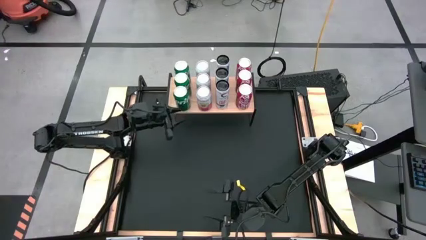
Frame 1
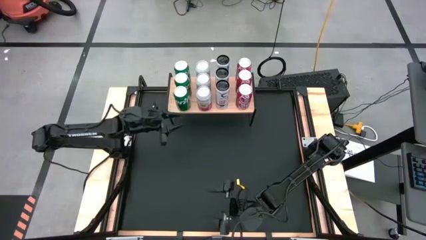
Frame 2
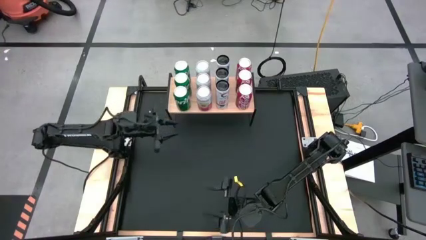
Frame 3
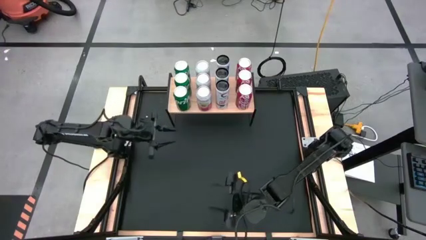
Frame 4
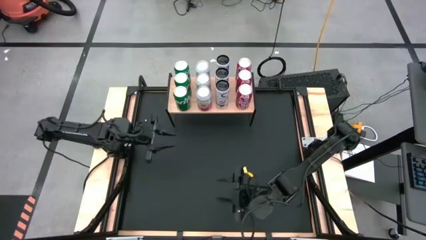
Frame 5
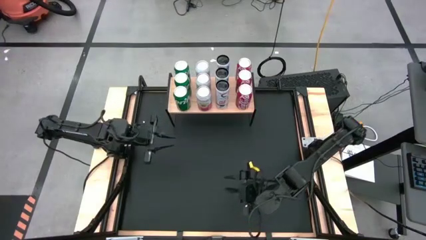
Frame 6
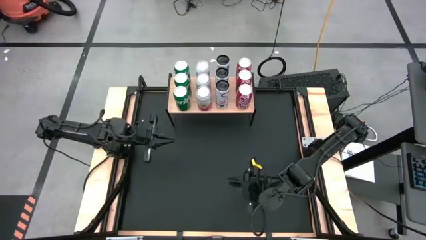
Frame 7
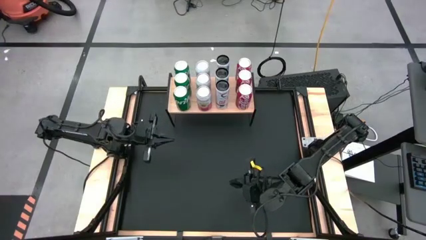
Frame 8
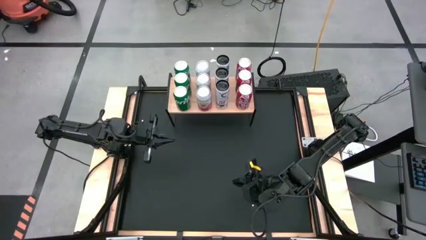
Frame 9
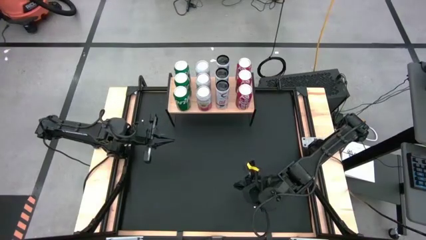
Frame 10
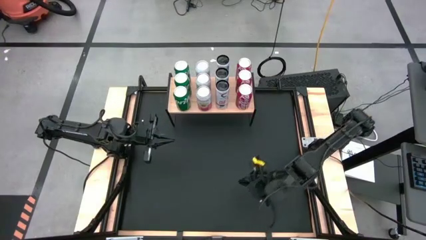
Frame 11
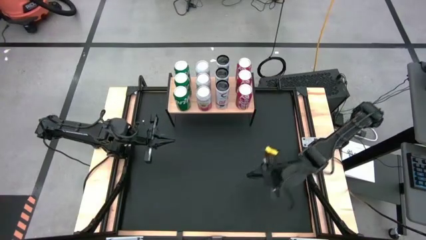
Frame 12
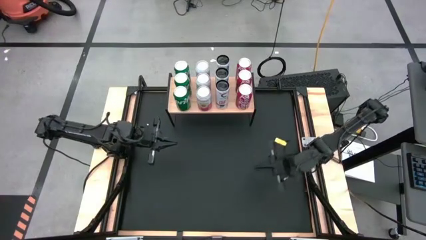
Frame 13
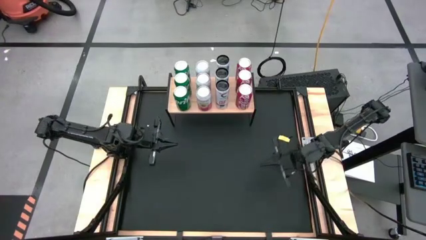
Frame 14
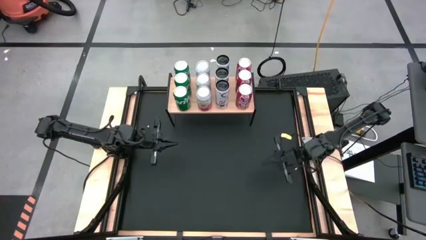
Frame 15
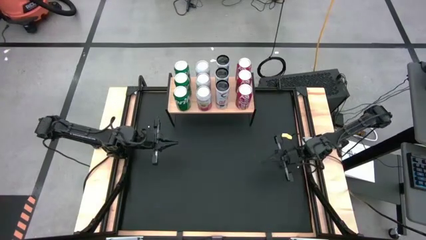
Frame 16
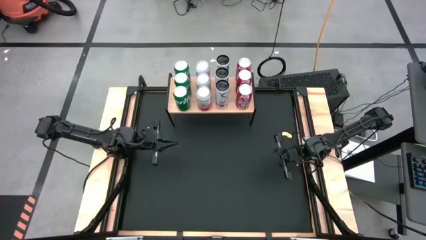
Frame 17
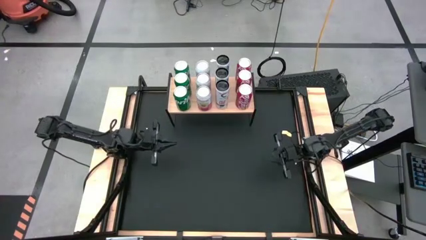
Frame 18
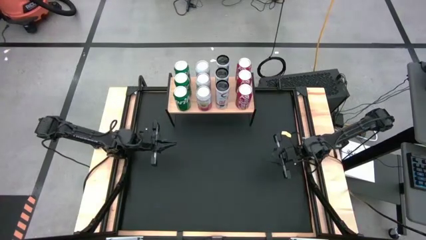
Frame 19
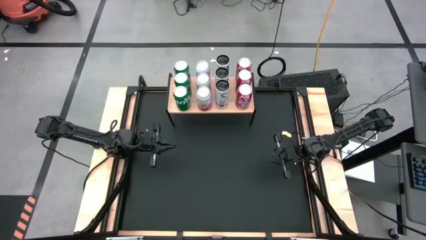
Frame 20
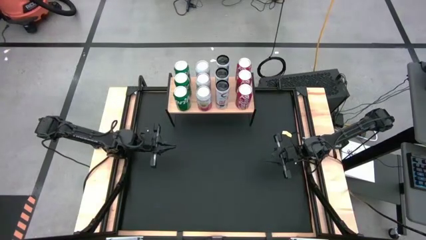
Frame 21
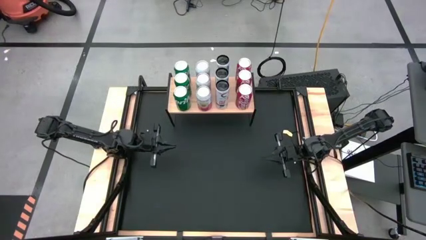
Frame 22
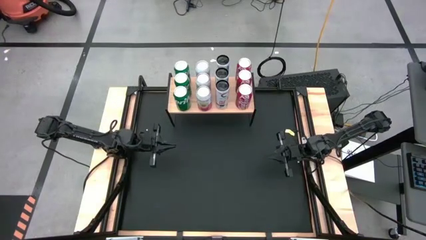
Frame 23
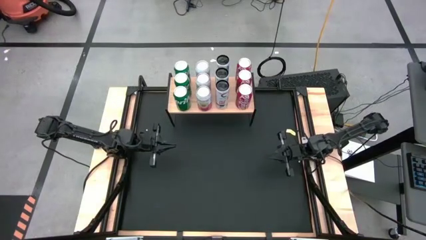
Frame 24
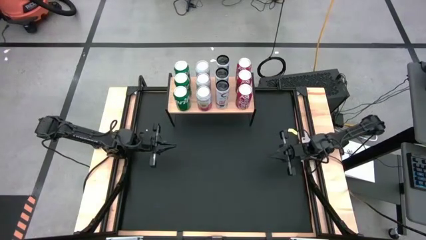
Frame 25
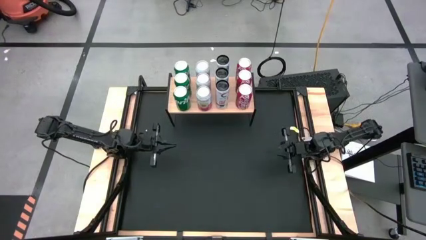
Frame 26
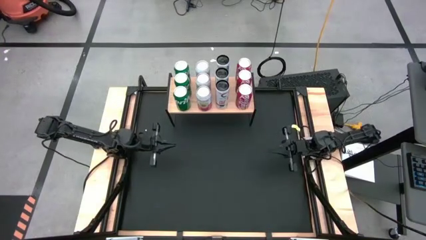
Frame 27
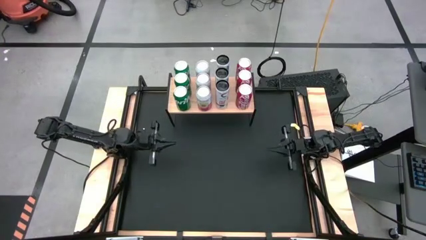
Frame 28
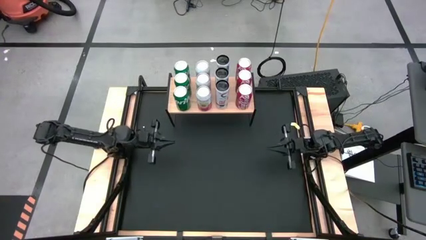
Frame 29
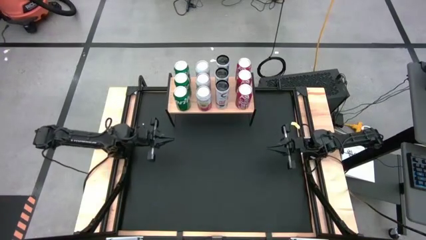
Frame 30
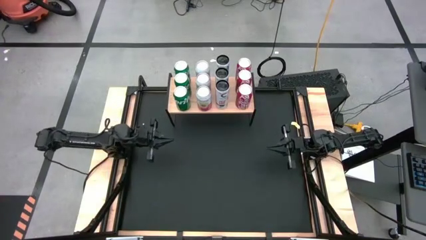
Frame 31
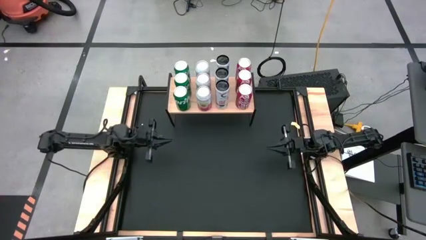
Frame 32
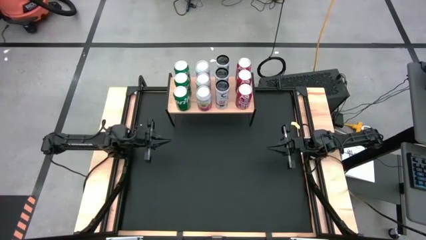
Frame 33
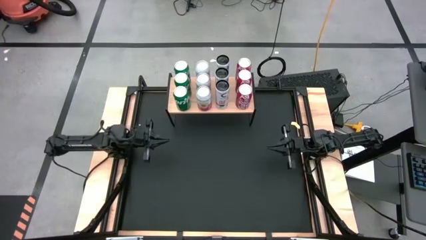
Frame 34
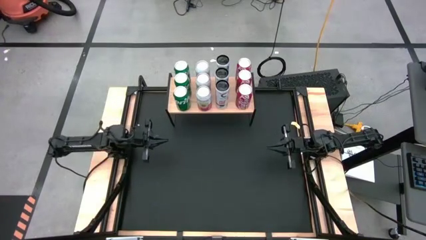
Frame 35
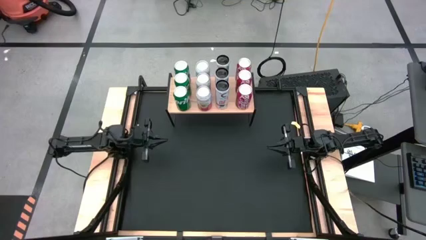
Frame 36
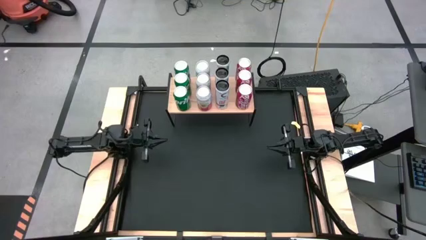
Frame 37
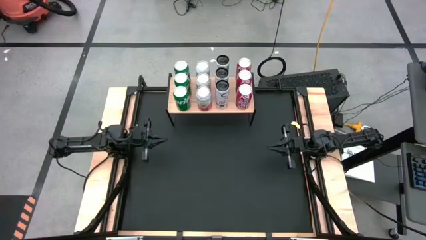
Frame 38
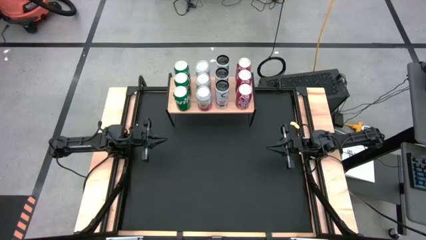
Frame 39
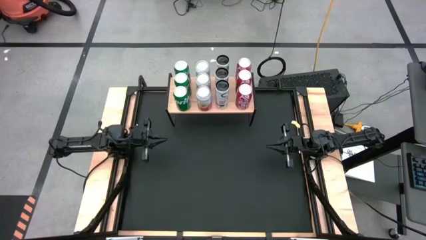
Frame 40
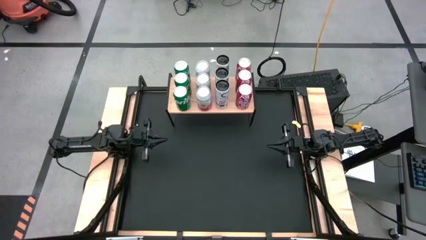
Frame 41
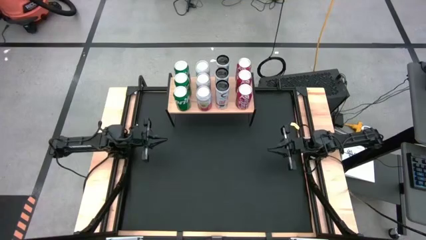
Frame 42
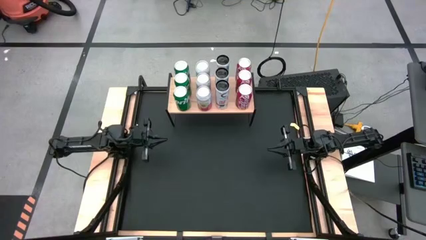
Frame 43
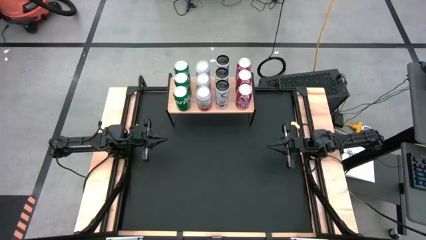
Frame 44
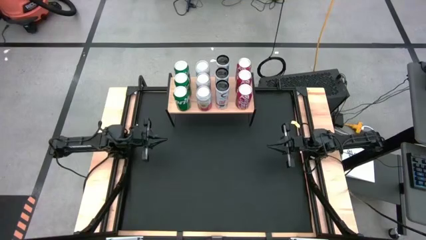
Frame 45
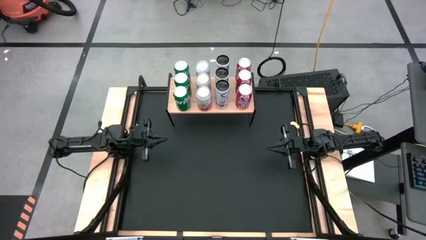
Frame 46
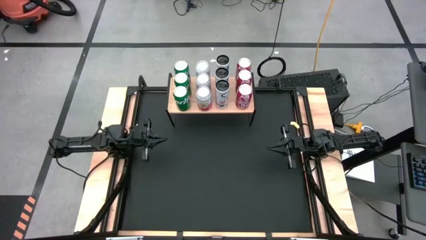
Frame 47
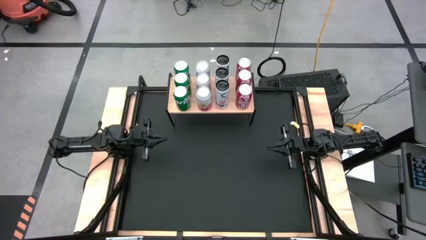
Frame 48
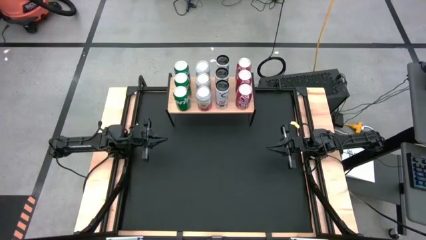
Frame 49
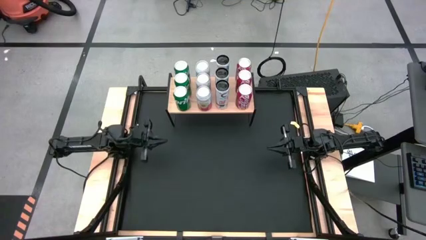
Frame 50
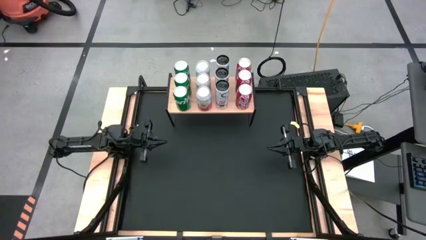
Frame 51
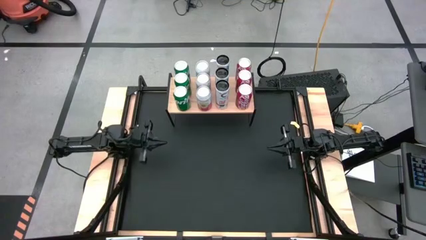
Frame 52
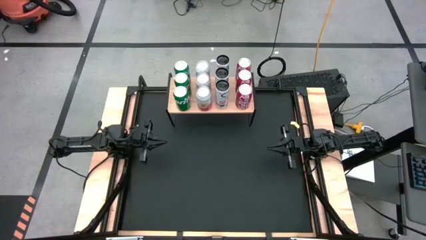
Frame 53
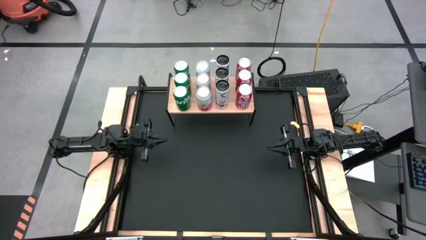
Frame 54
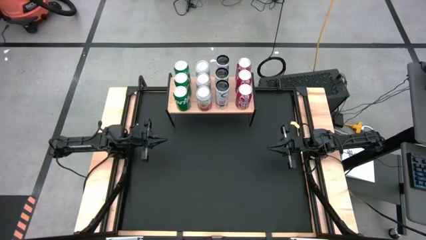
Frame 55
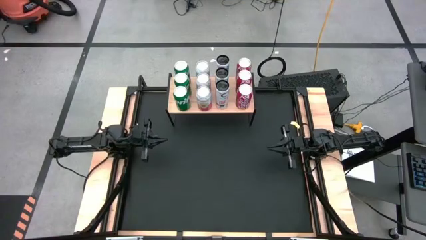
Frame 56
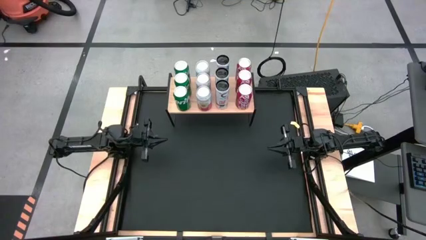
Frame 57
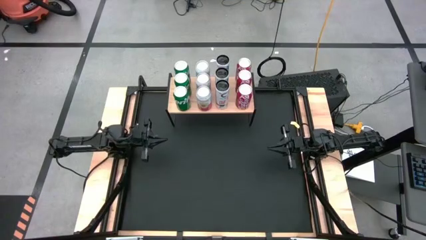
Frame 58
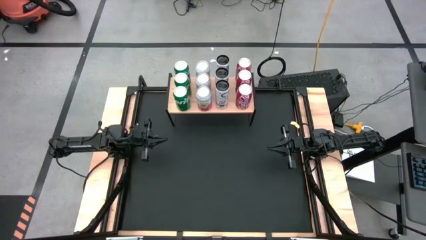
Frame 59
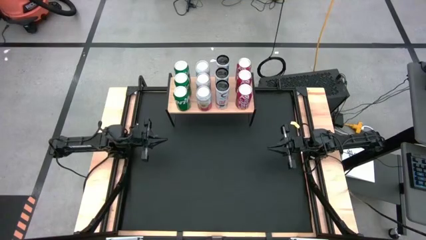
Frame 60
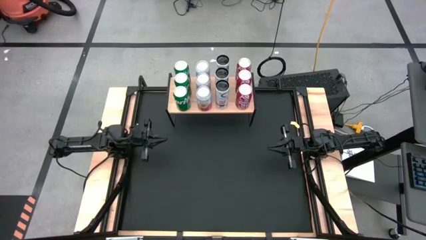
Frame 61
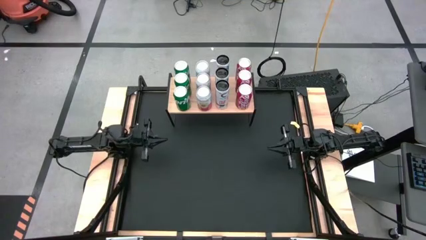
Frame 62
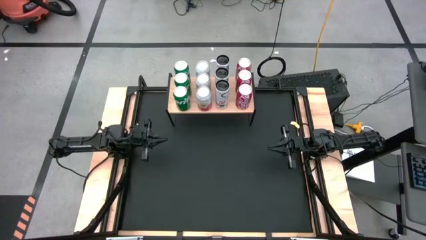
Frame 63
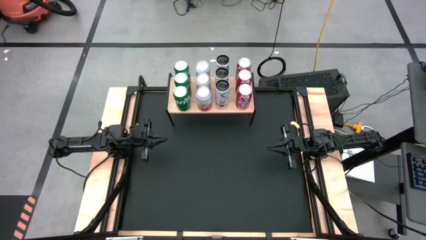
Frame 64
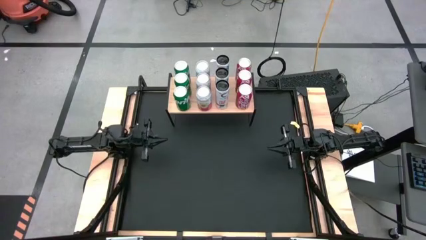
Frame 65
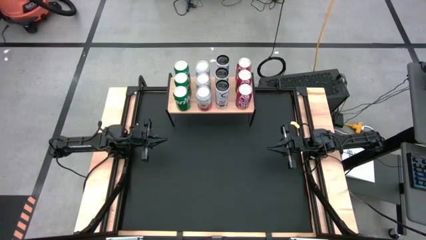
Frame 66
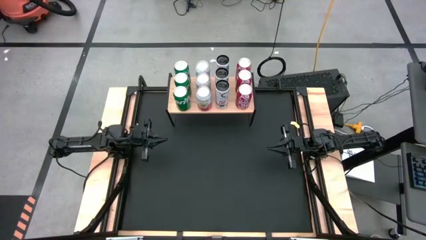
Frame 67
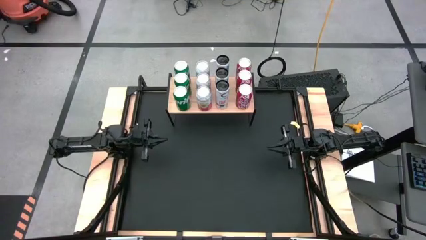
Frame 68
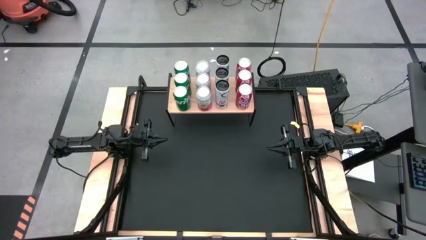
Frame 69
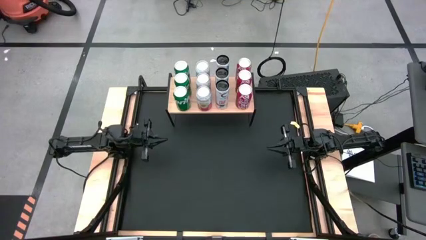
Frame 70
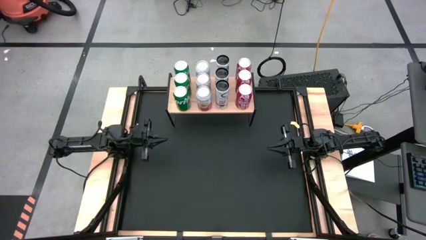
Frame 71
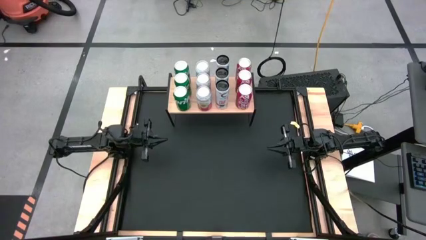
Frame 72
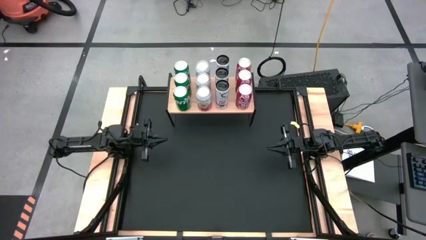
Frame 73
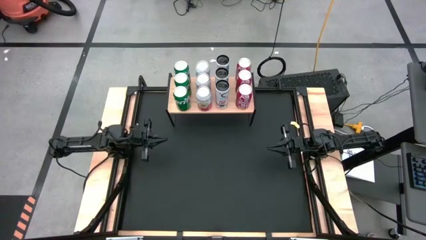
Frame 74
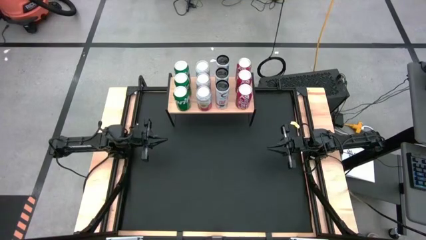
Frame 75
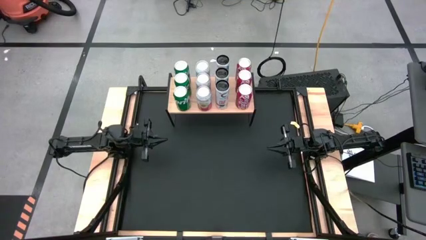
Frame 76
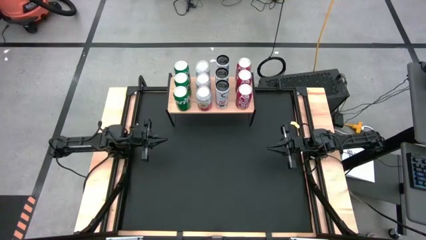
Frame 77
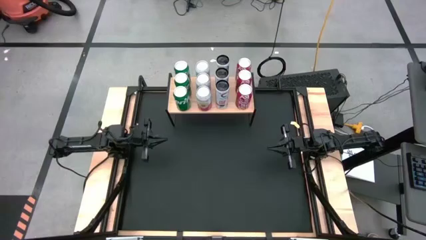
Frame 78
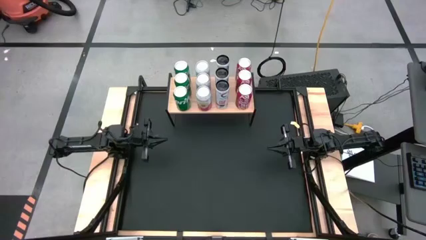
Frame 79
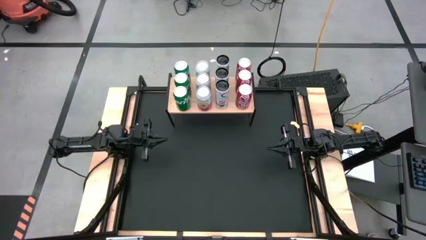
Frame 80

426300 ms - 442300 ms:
Task: Place canned beverage on shelf
Return to Home Position
